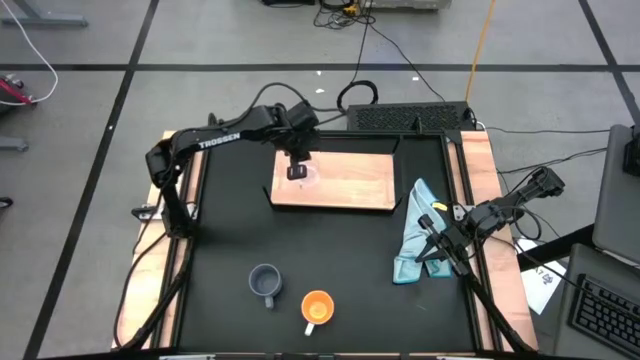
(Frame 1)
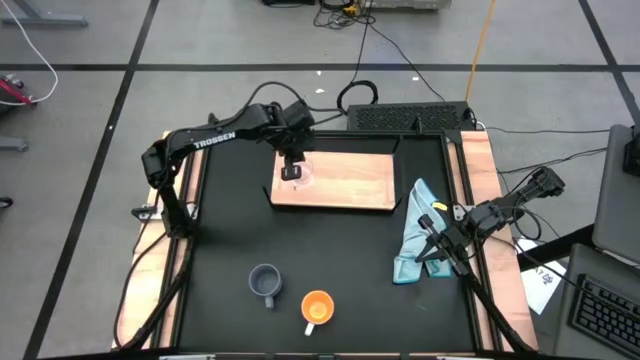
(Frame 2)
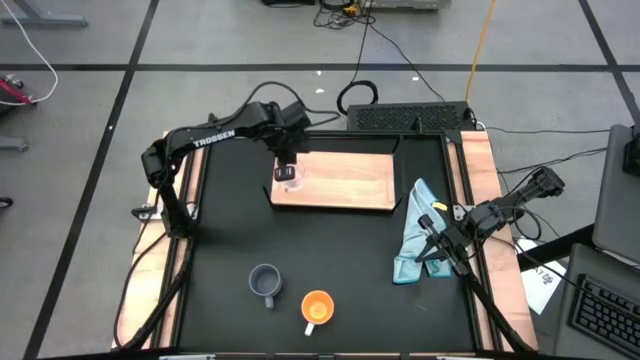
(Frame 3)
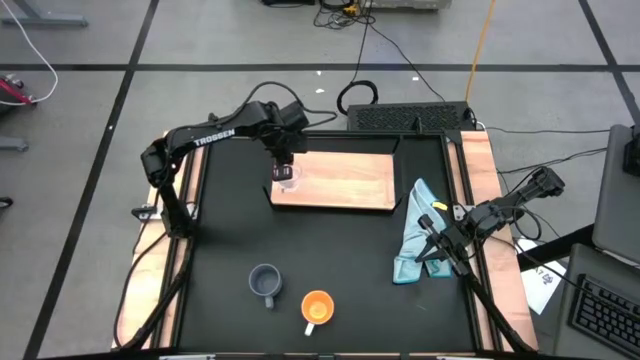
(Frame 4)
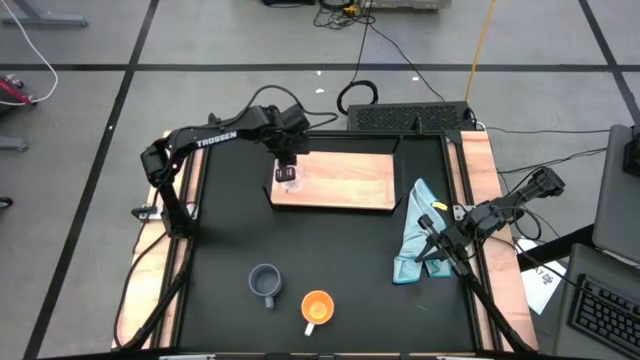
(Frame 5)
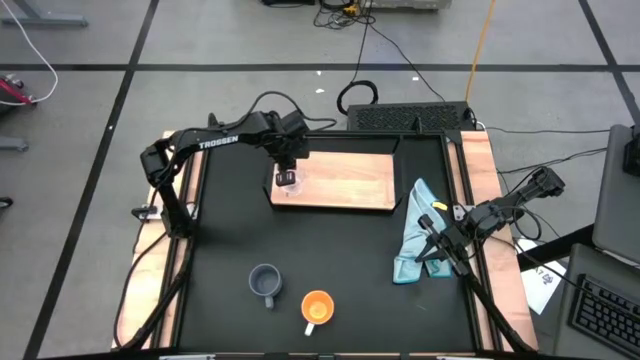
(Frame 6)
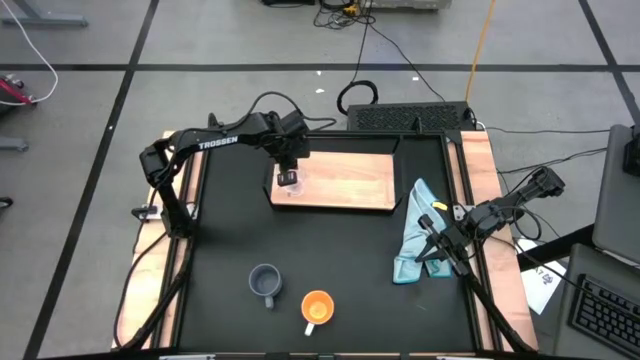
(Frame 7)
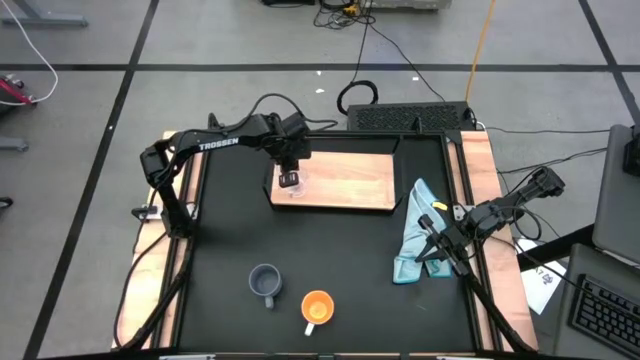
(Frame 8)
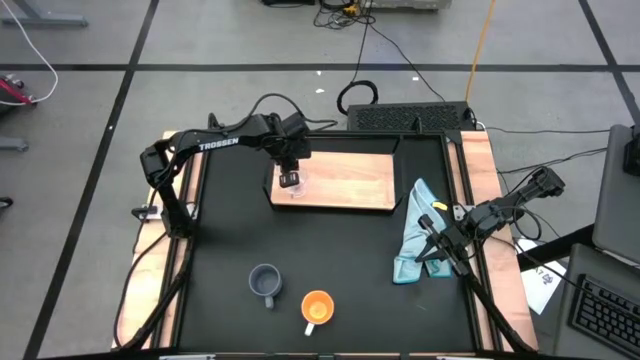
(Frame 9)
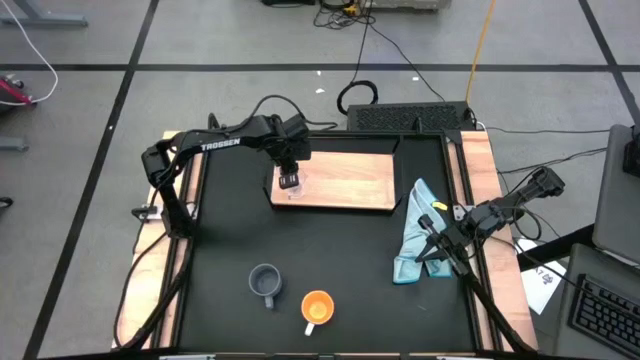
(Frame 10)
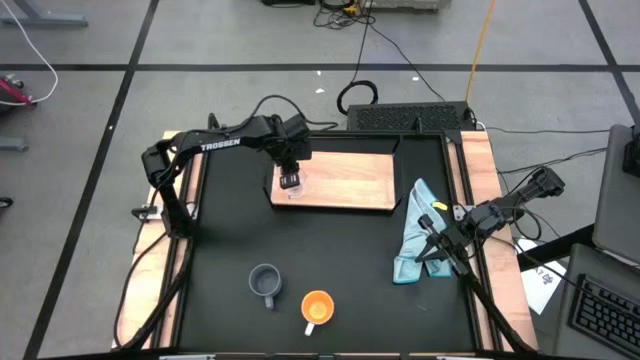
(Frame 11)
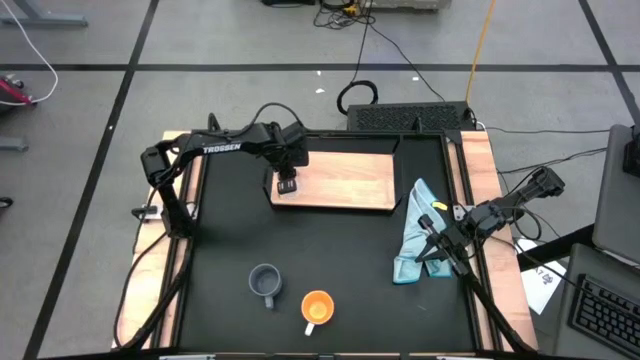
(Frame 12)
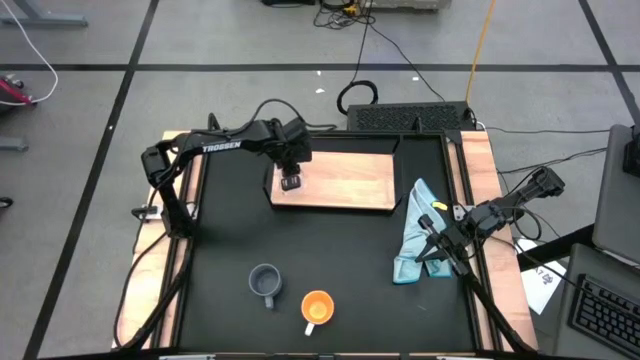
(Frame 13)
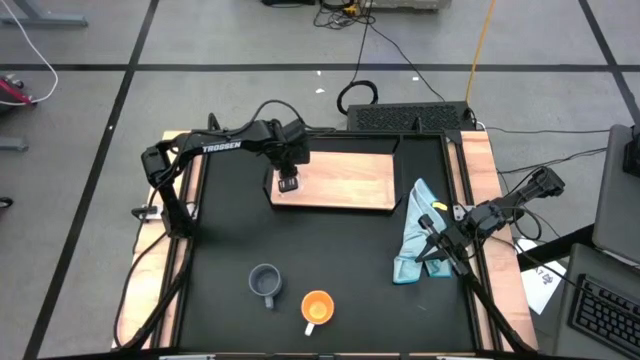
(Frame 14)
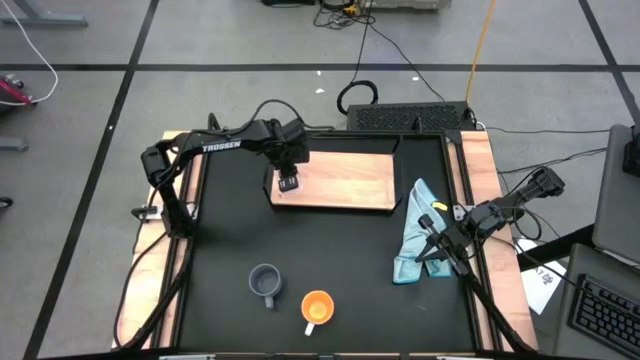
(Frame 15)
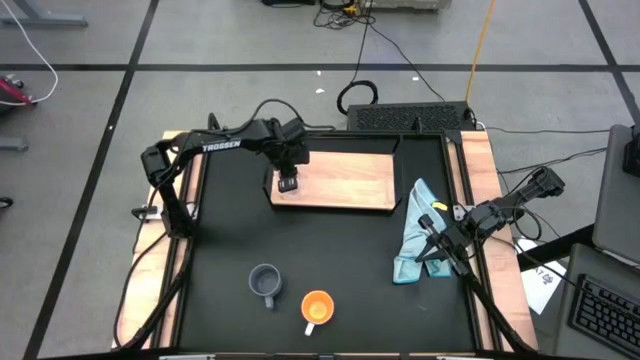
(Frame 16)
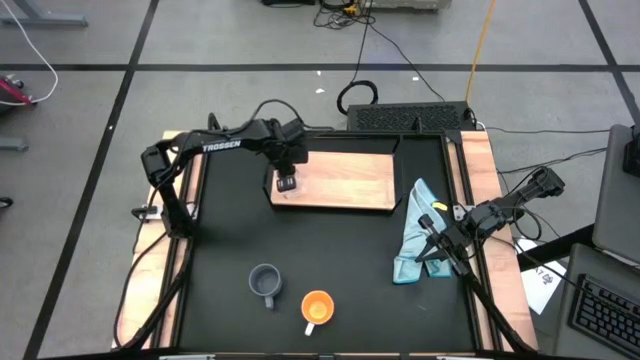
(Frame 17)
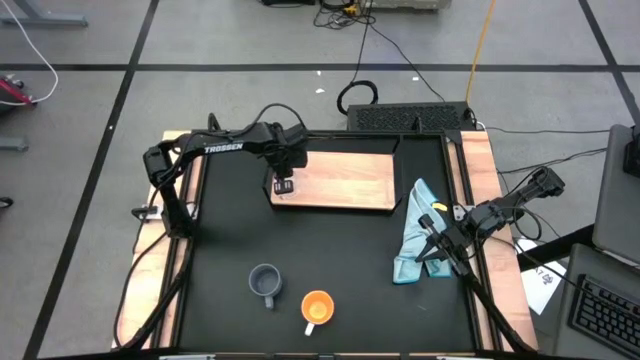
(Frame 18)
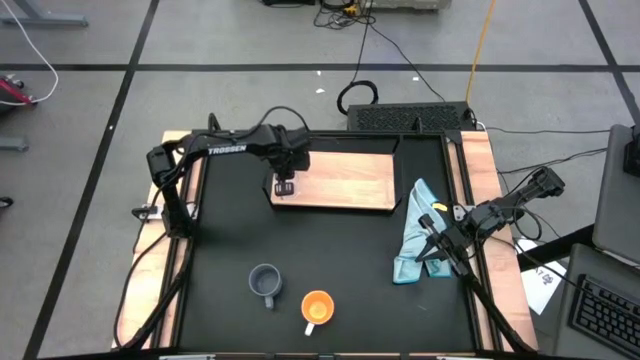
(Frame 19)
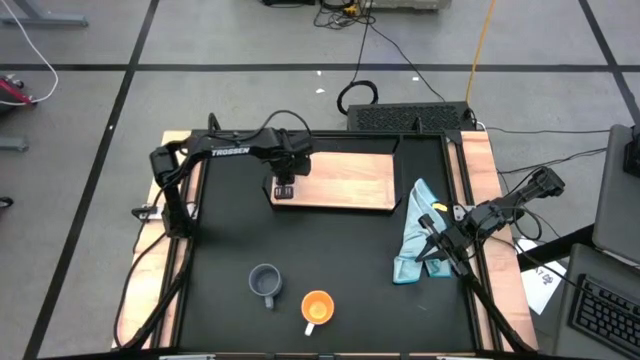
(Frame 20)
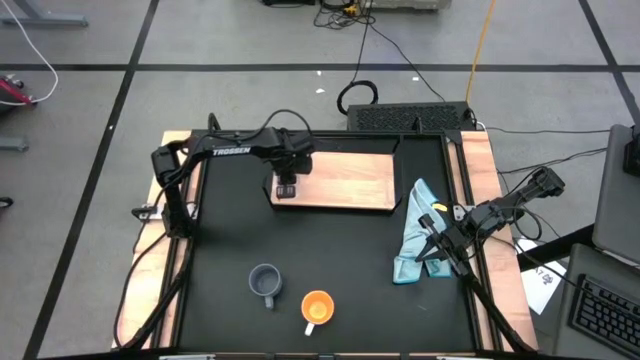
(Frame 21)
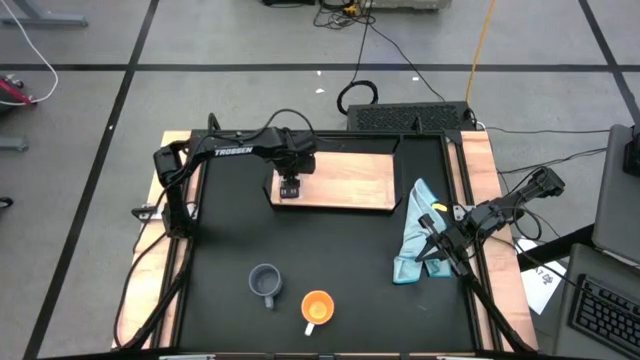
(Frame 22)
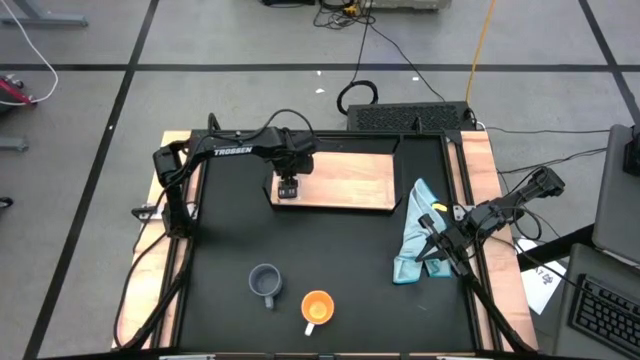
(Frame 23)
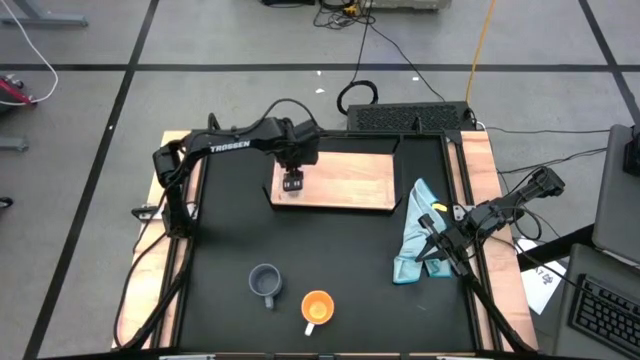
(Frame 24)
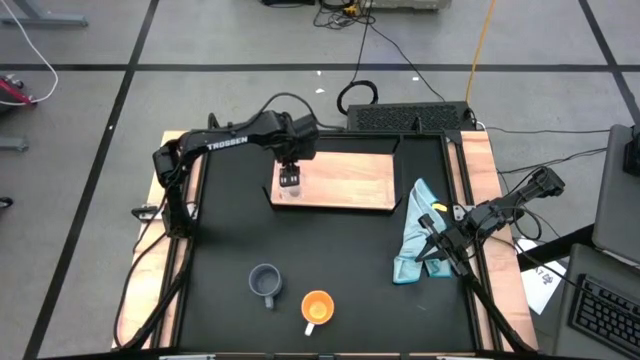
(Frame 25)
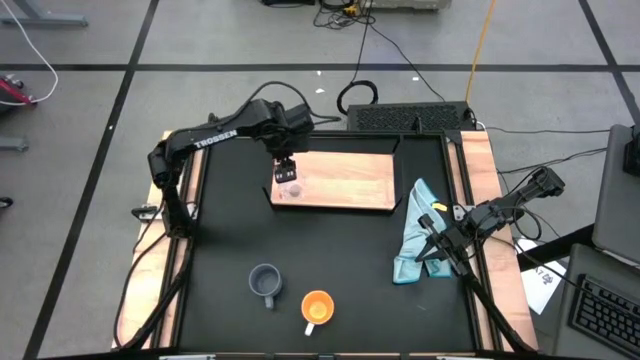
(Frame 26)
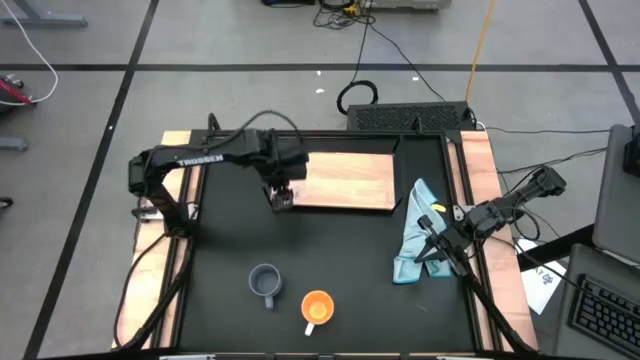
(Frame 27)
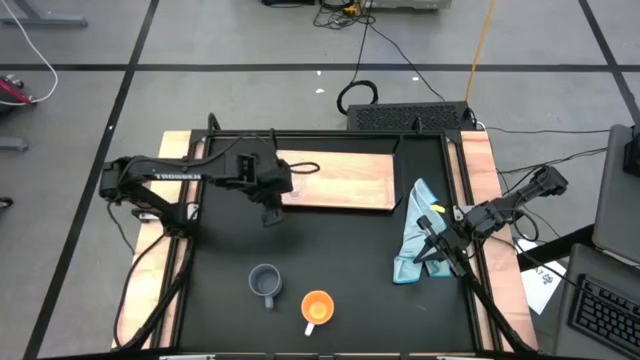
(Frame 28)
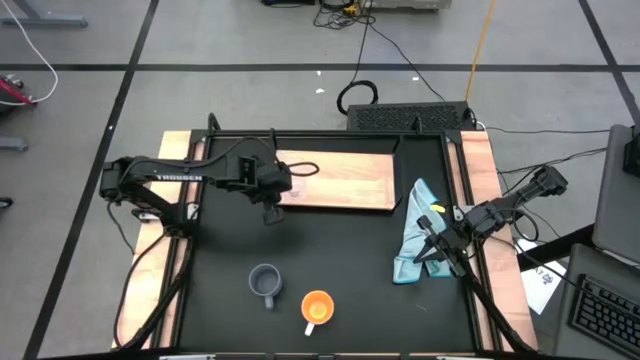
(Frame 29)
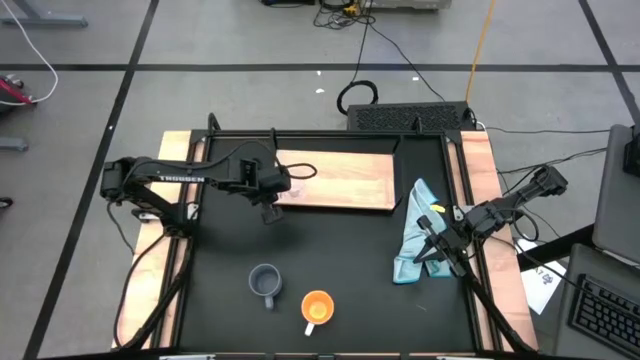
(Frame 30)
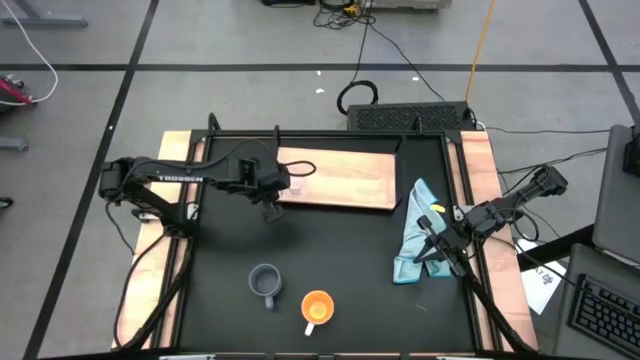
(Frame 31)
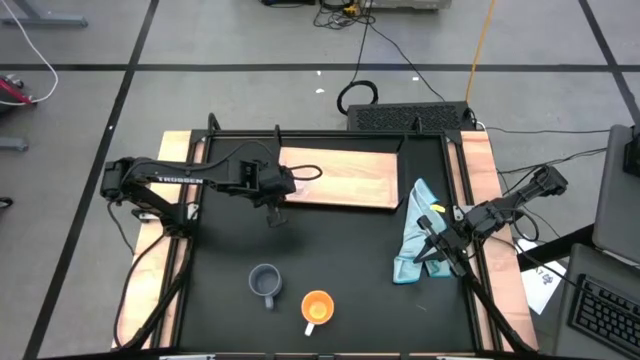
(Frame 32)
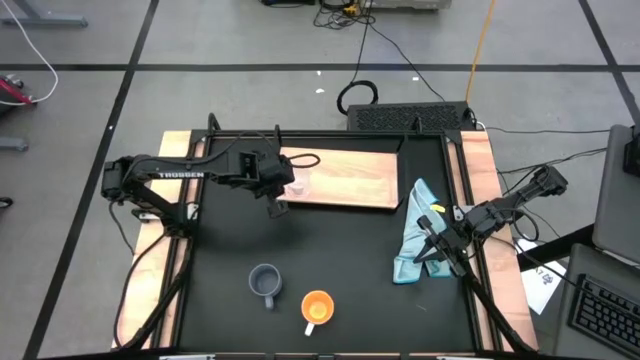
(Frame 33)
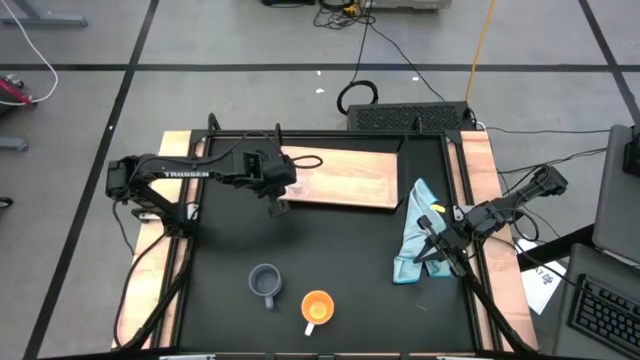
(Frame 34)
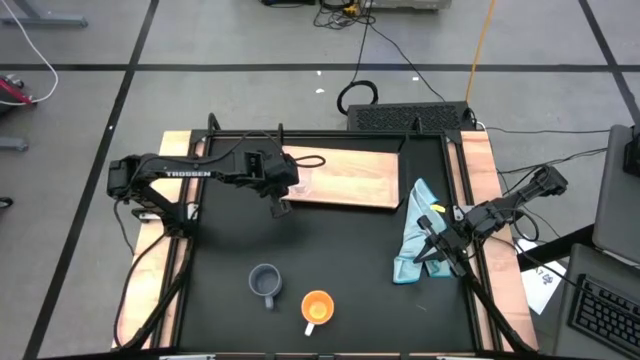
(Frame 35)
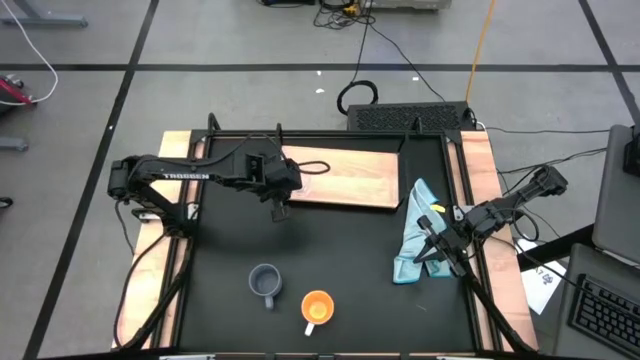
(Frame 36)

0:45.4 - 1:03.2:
Task: Stack small to large cups/mugs on shelf
Put the transparent mug on the shelf

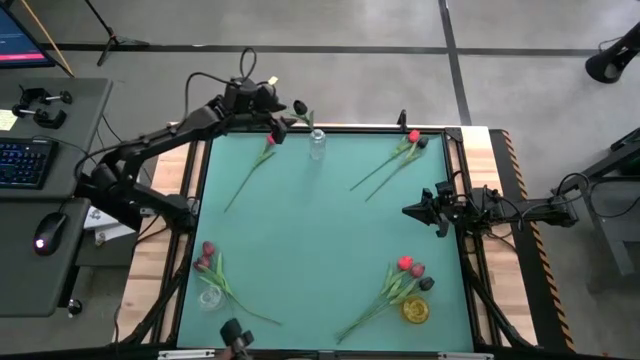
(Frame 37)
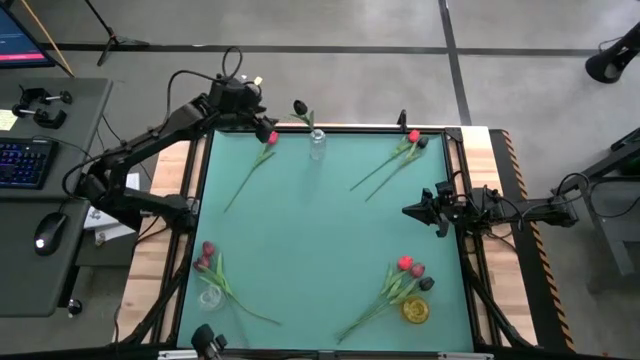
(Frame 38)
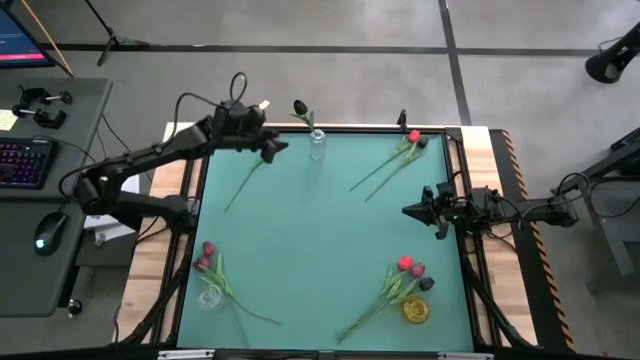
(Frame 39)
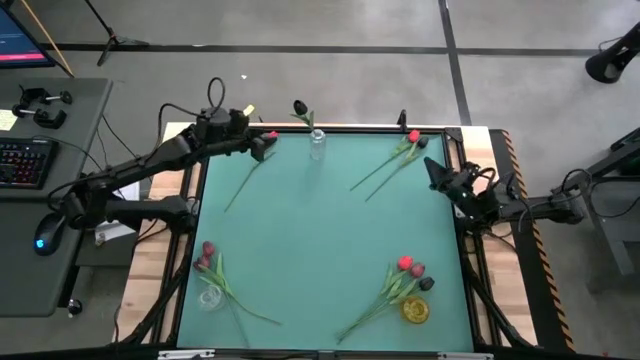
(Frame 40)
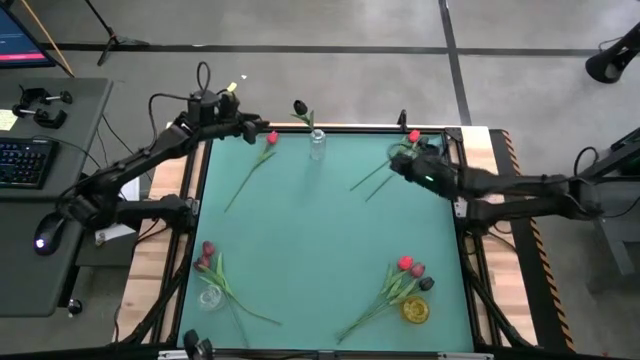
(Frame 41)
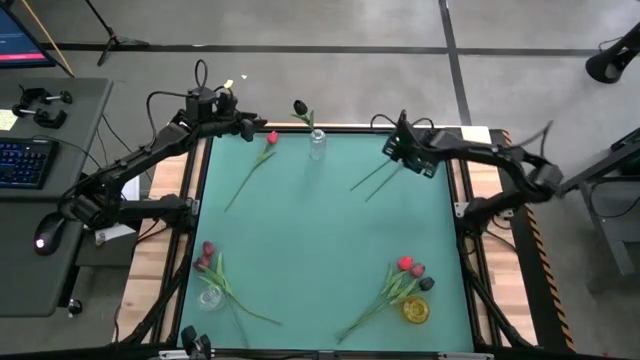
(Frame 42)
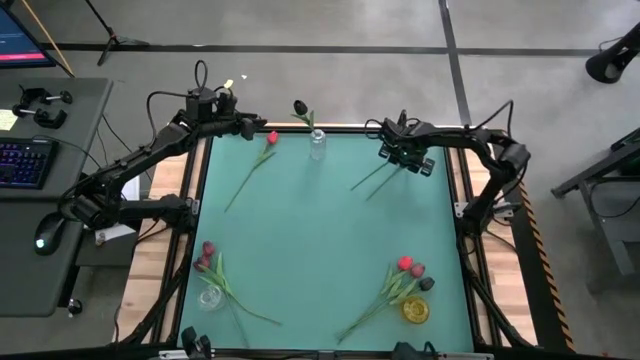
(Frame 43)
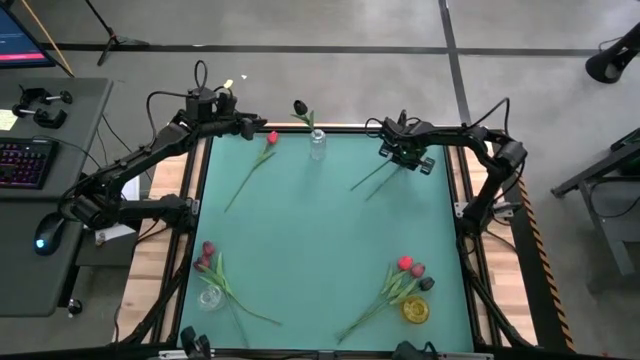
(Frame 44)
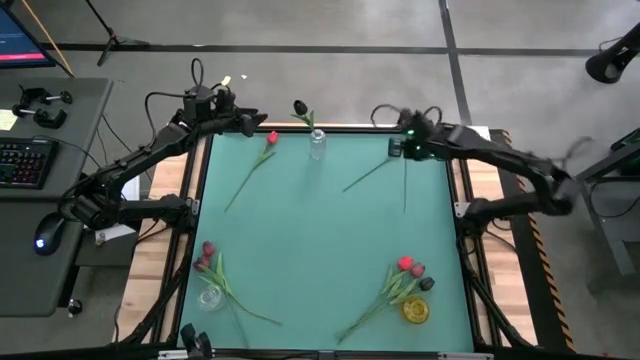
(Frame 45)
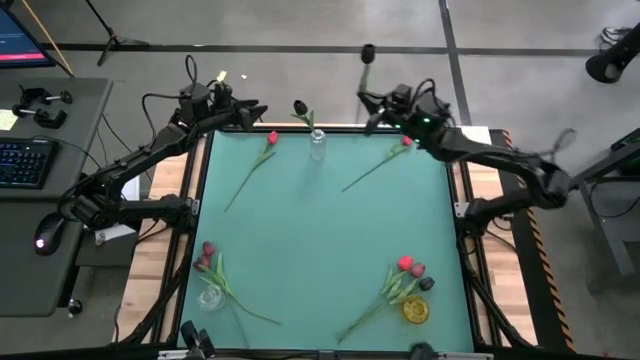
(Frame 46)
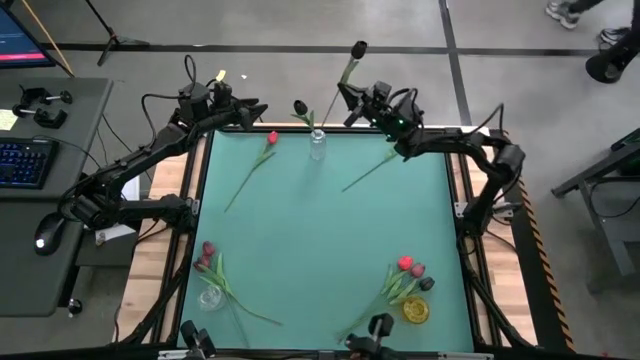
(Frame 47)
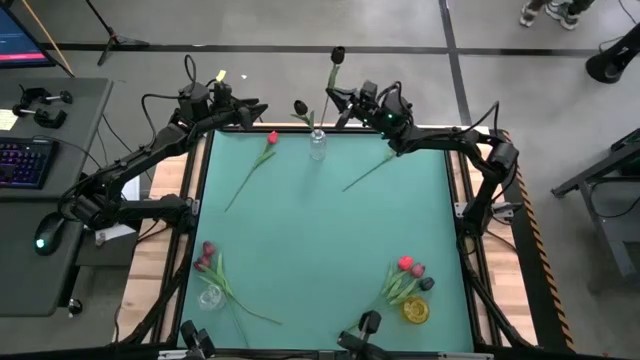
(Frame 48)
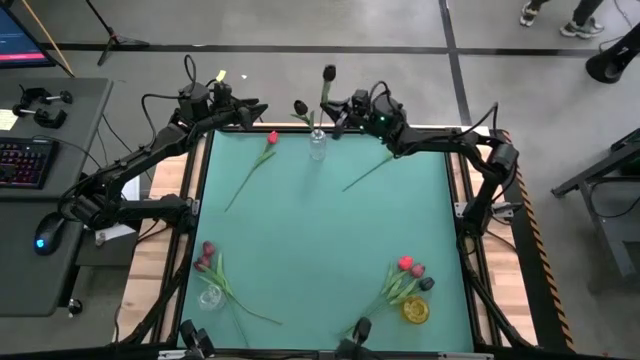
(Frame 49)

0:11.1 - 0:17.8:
Task: Sort flowers into vase by color
Put the top black tulip into the top transparent vase
